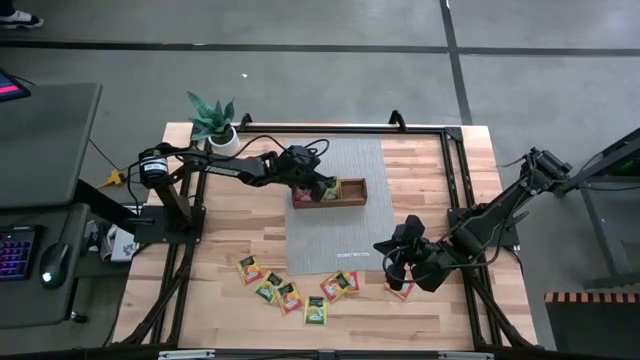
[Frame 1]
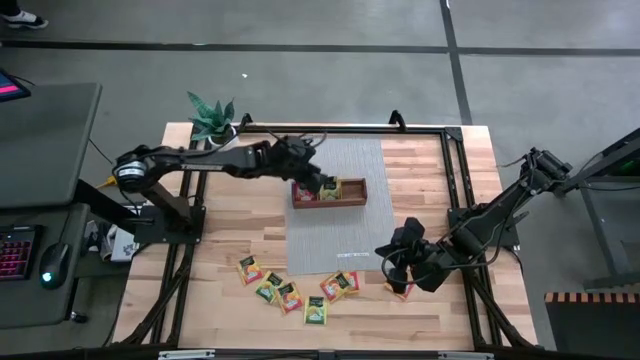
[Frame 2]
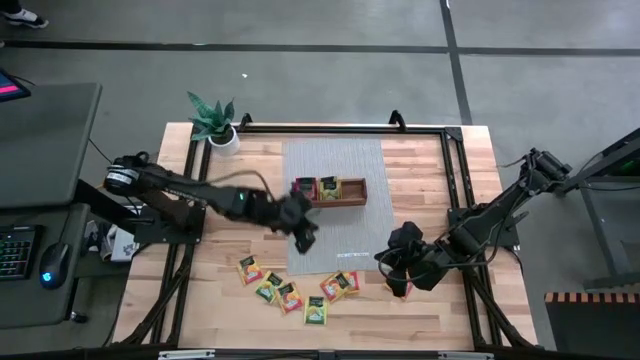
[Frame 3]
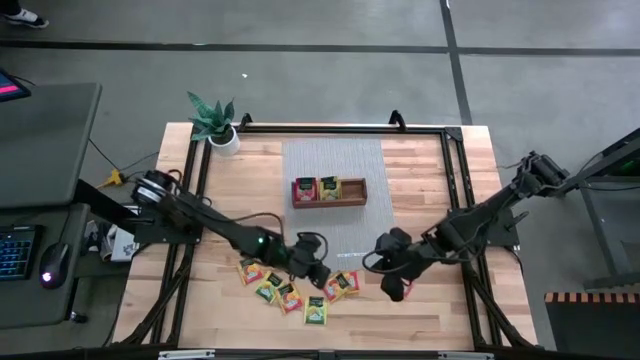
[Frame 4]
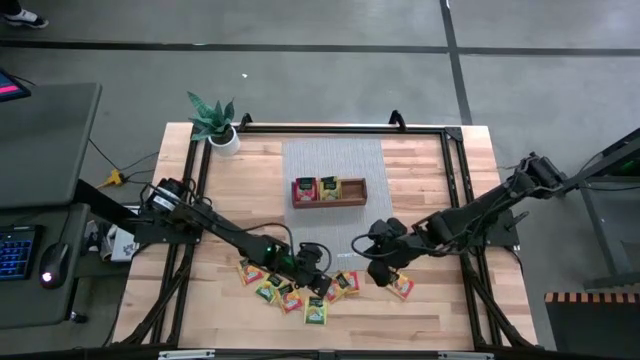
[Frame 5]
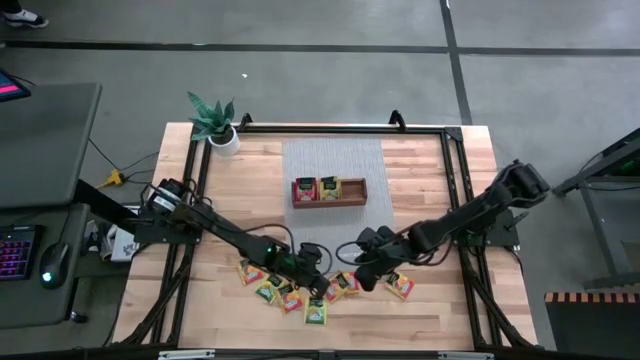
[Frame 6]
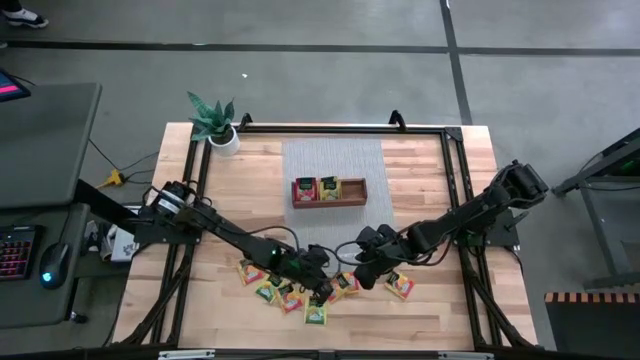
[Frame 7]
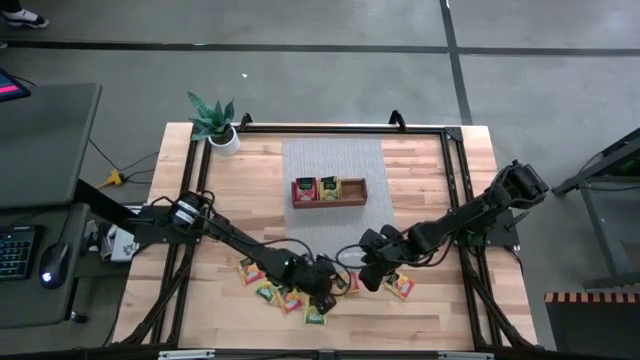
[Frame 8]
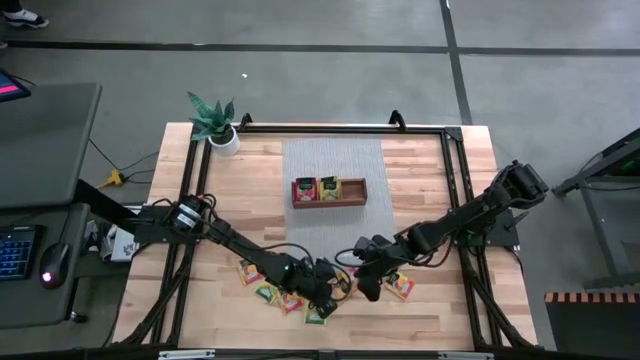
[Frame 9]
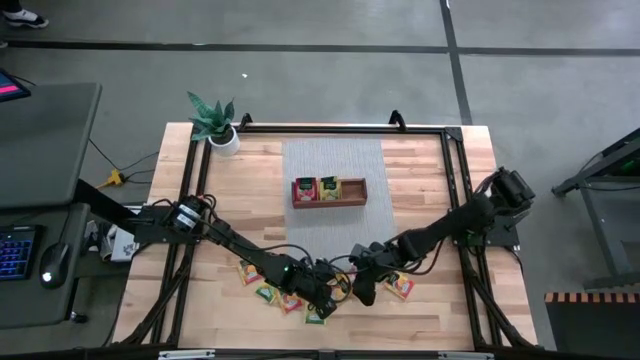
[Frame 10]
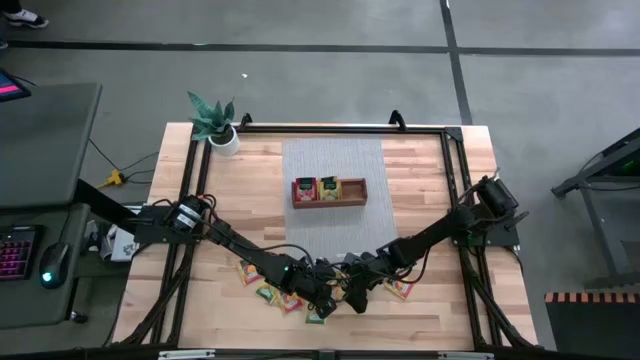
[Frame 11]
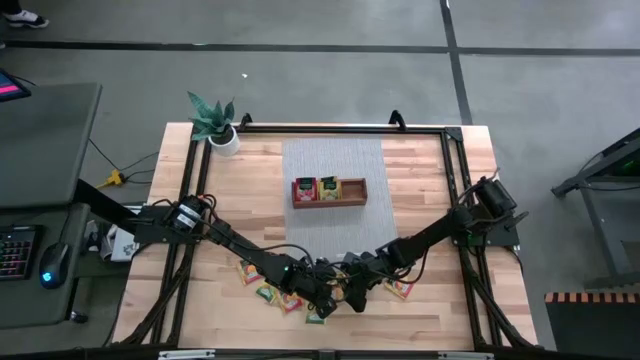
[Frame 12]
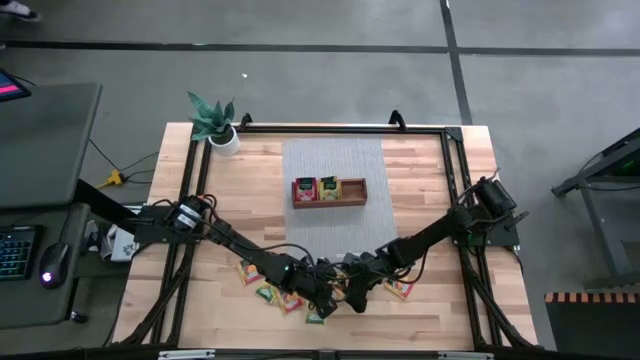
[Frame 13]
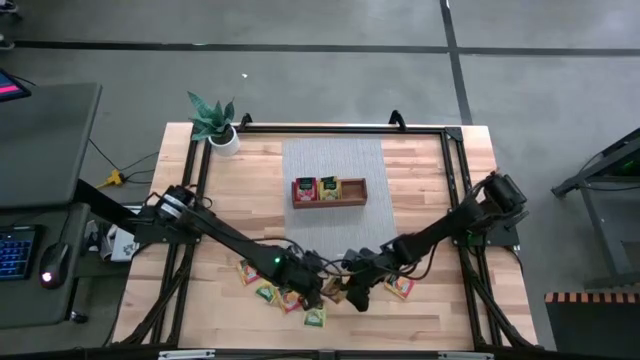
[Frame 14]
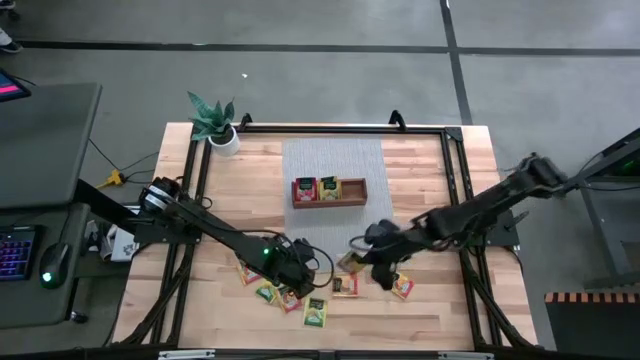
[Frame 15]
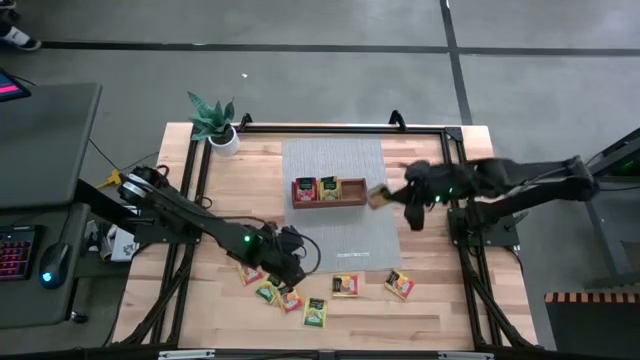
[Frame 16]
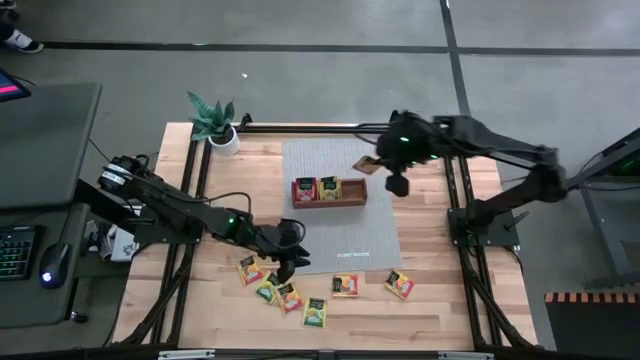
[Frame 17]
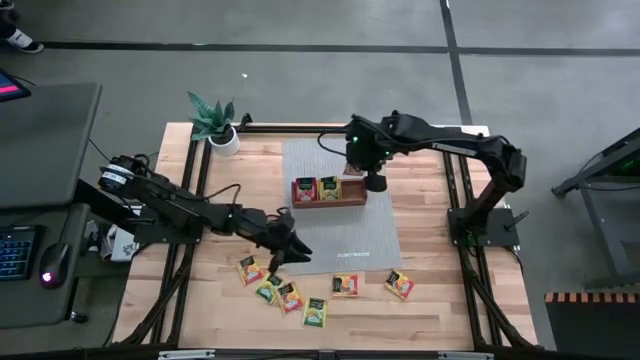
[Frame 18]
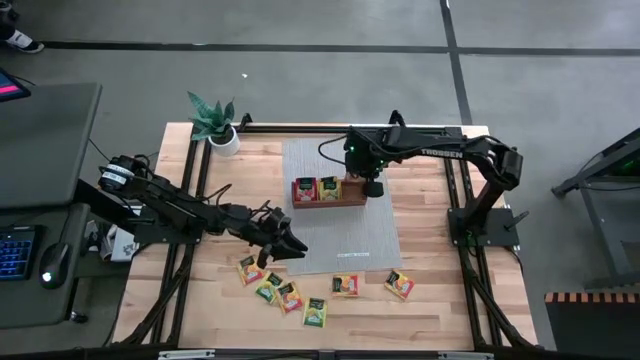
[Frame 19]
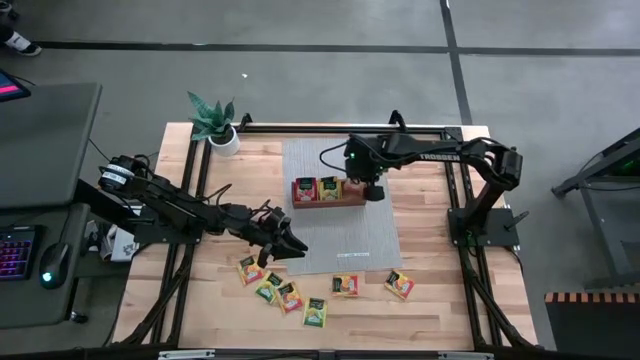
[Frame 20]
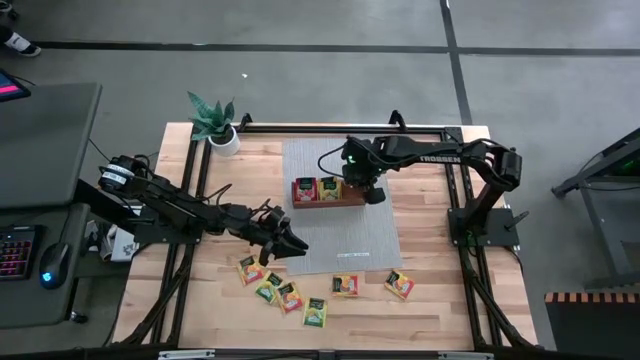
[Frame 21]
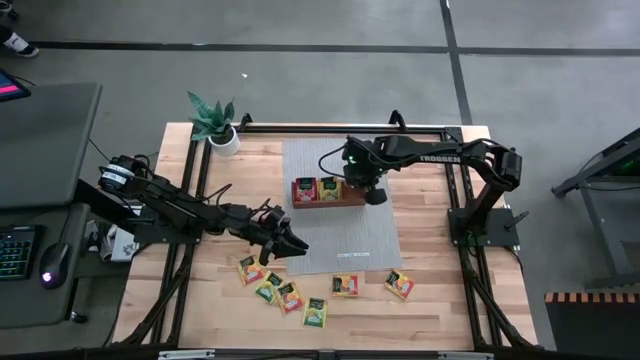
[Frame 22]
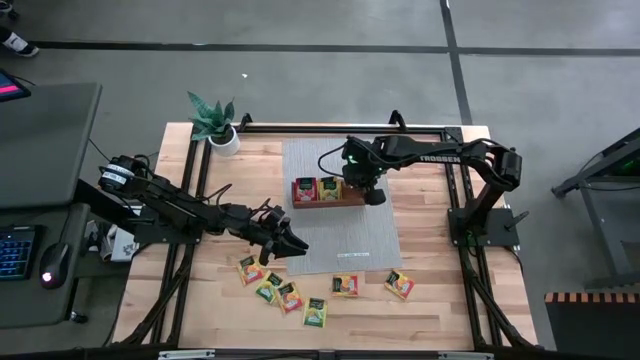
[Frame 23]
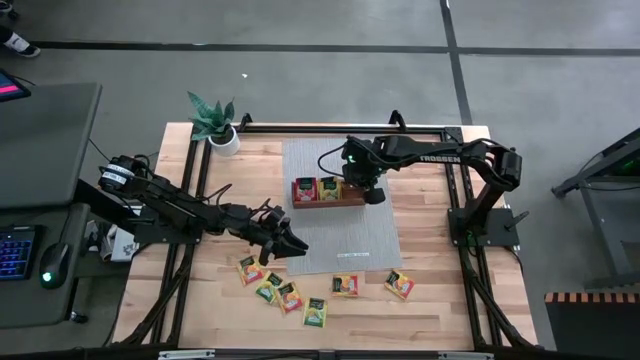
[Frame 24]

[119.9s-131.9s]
Task: Pick & Place Tea
Put the orange tea bag into the right section of the wooden organizer

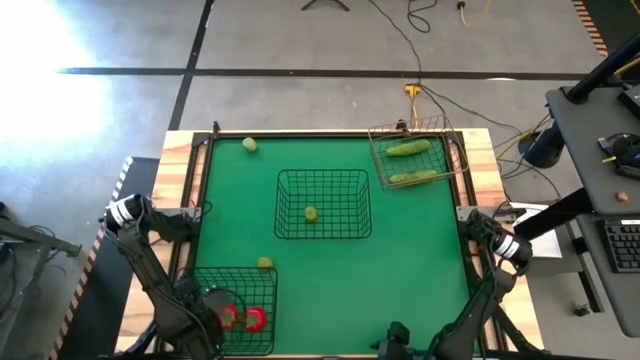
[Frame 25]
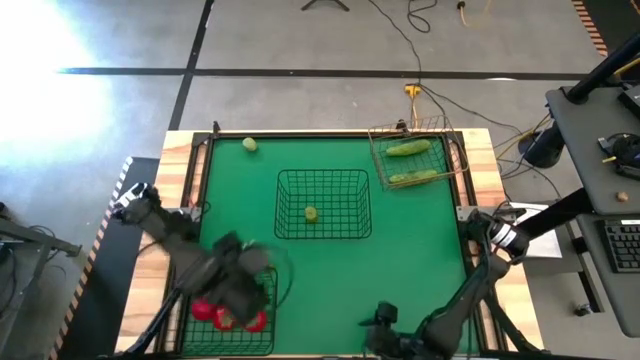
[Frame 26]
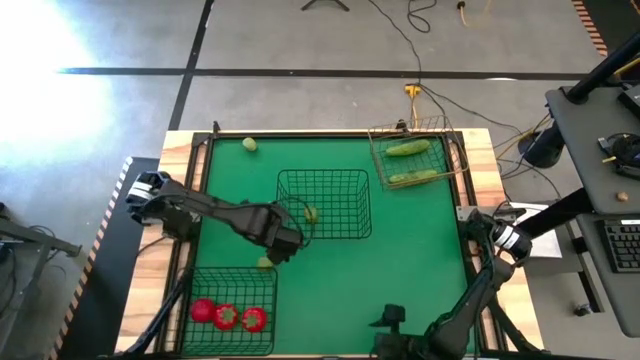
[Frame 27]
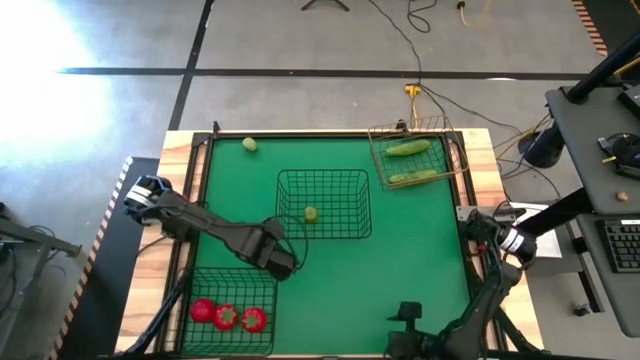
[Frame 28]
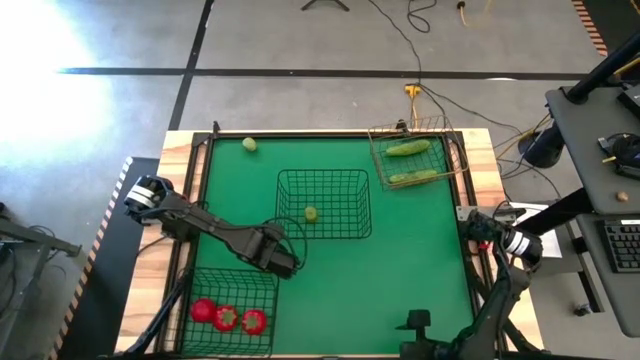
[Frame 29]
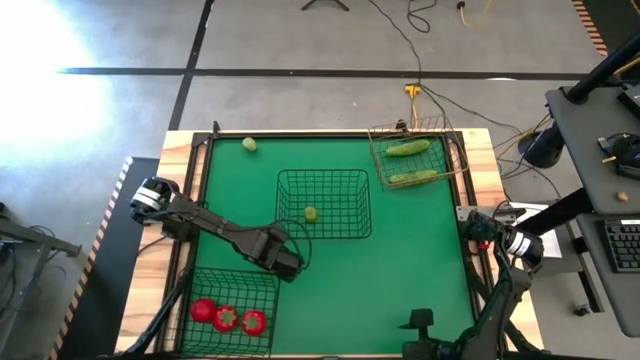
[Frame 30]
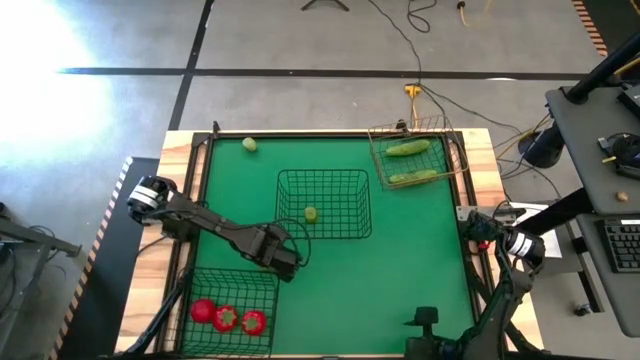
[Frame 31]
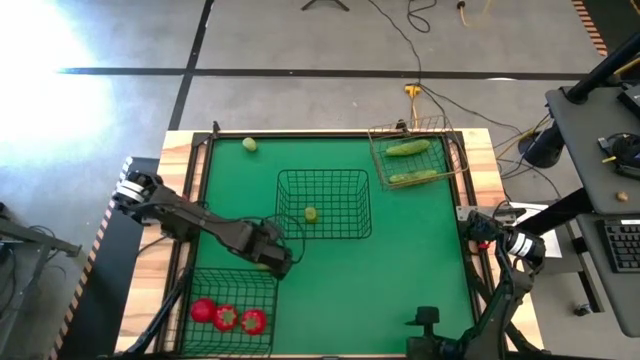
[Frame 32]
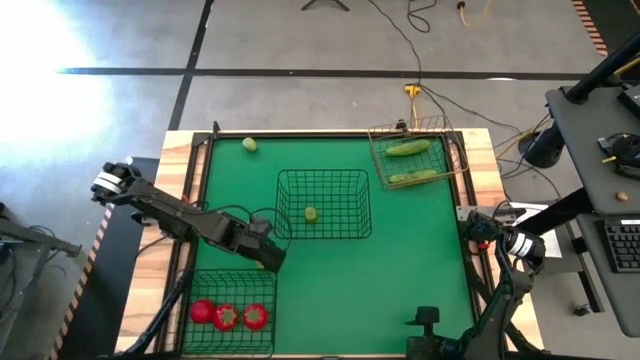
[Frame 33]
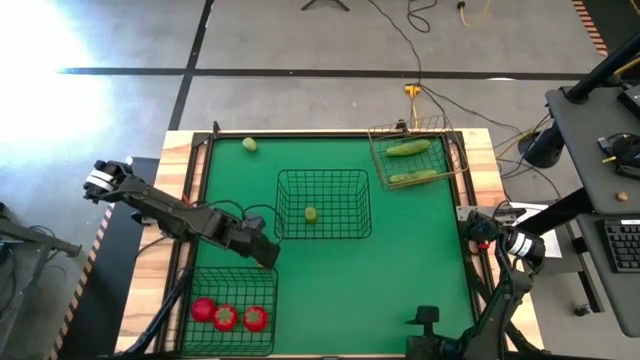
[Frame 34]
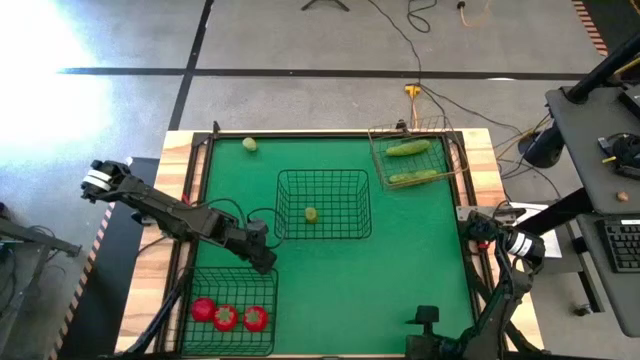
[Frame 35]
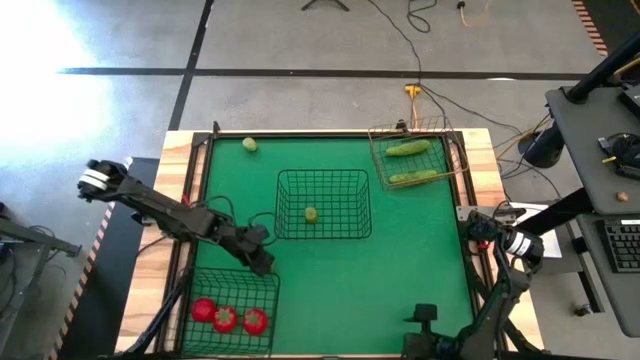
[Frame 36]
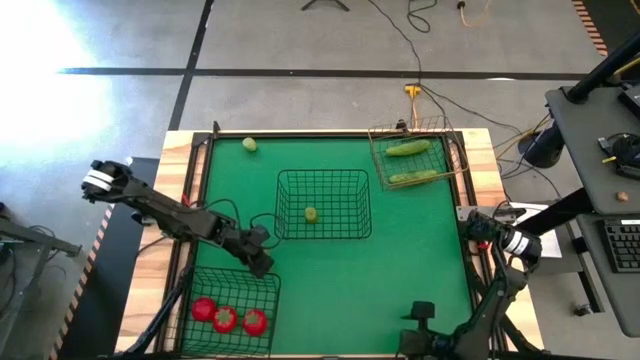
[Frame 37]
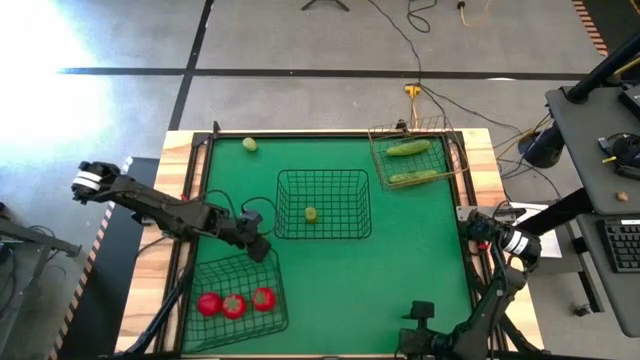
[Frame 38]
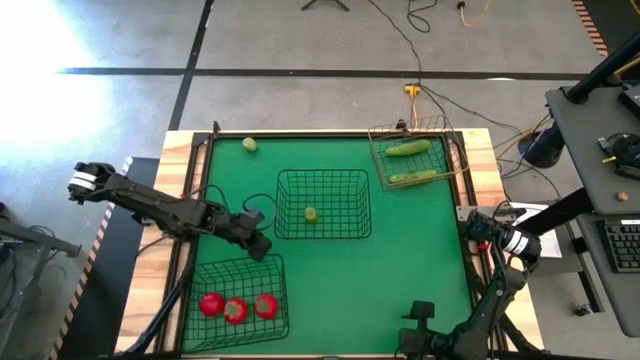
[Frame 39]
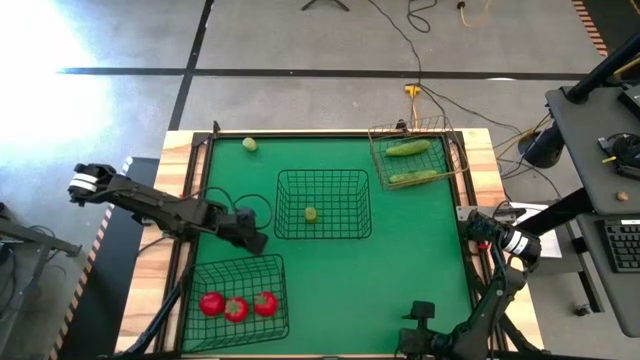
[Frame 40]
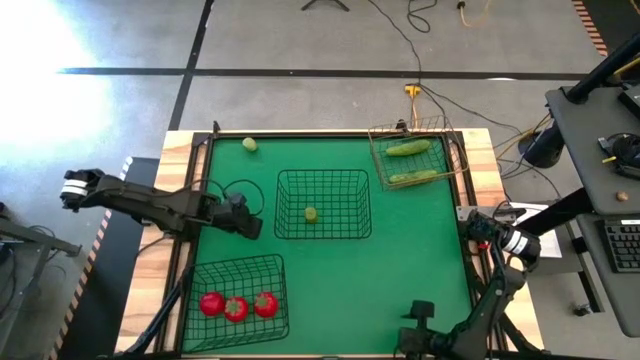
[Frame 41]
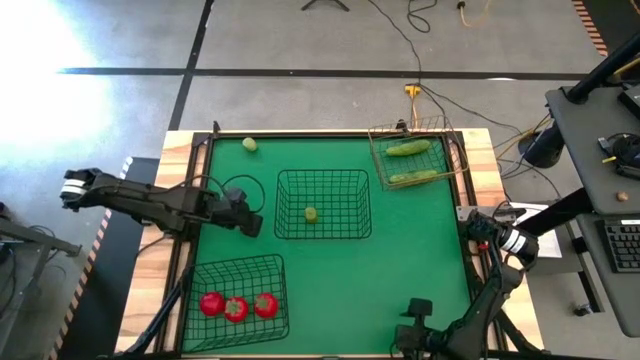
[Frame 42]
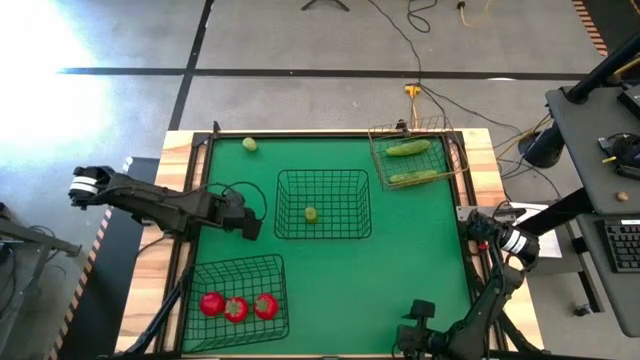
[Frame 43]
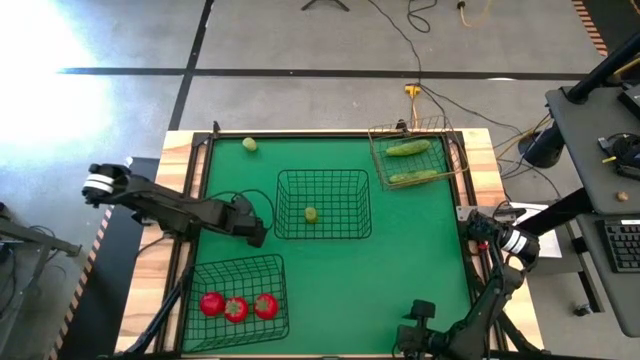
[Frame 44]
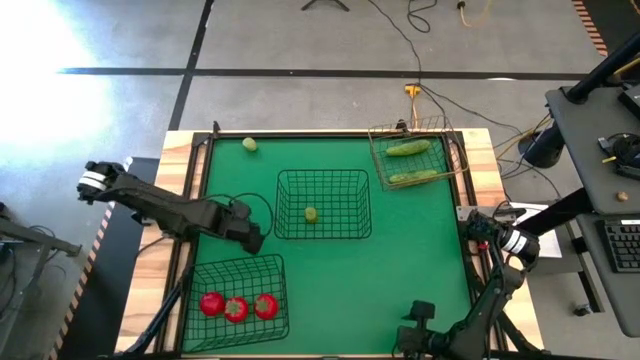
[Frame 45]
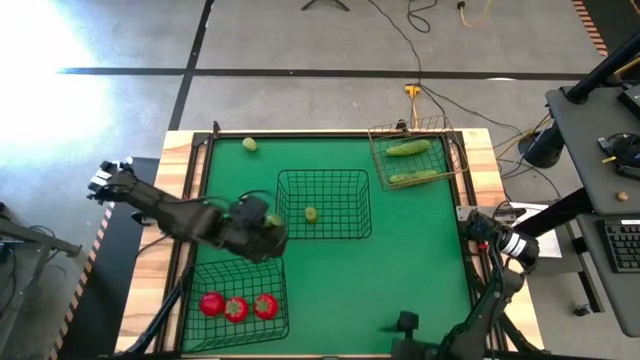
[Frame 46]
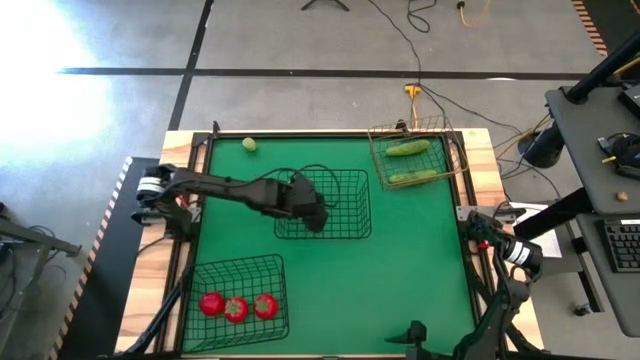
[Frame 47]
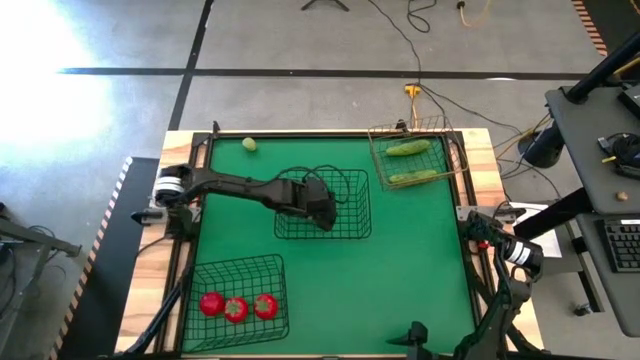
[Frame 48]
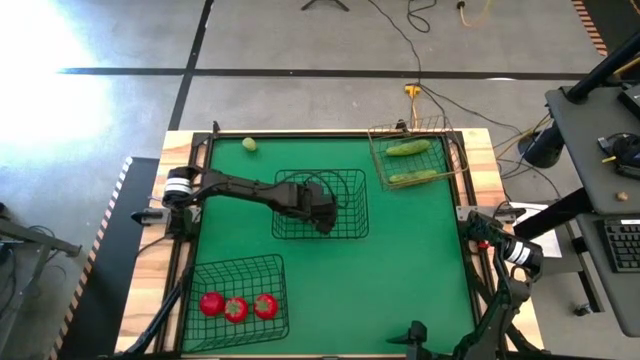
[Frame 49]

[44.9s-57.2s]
Task: Sort produce into baskets
Put the bottom green lime into the top black wire basket
